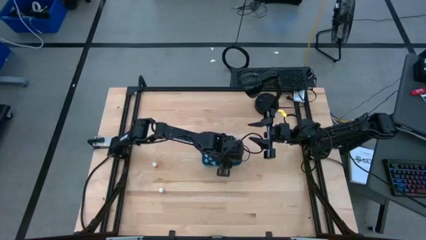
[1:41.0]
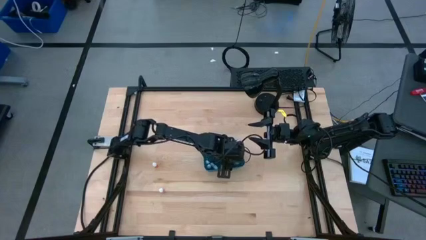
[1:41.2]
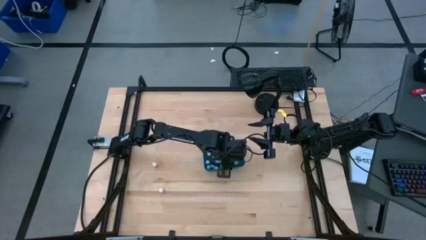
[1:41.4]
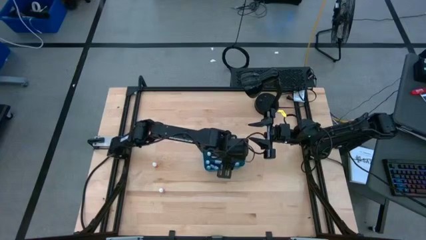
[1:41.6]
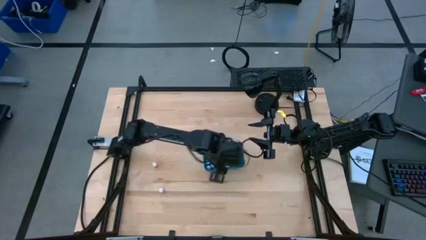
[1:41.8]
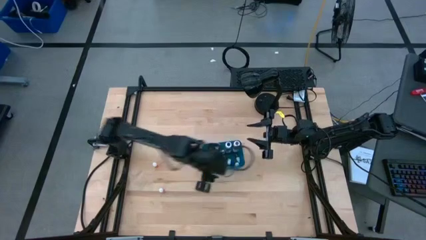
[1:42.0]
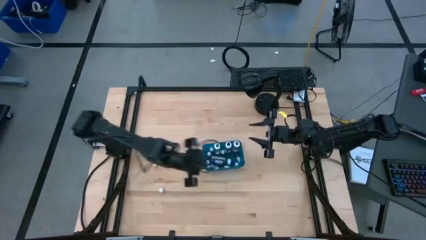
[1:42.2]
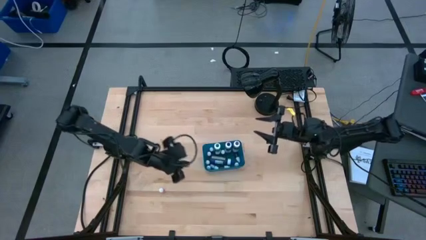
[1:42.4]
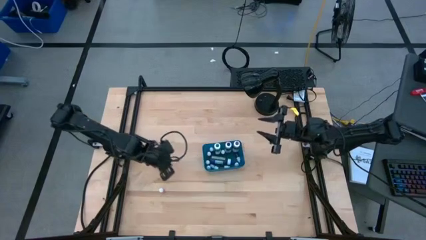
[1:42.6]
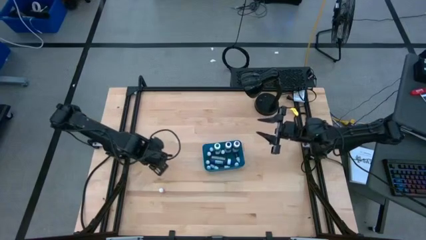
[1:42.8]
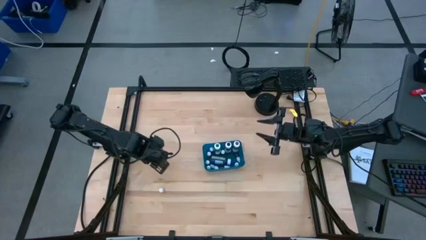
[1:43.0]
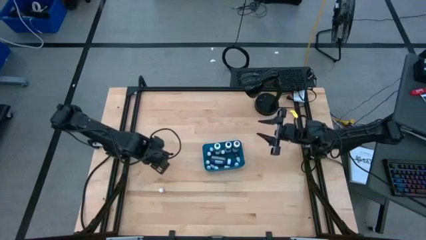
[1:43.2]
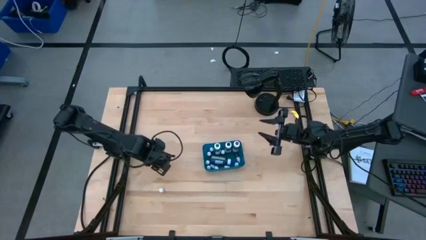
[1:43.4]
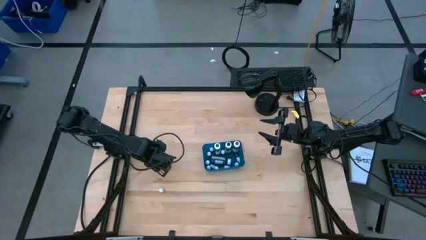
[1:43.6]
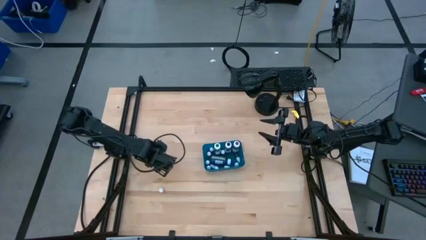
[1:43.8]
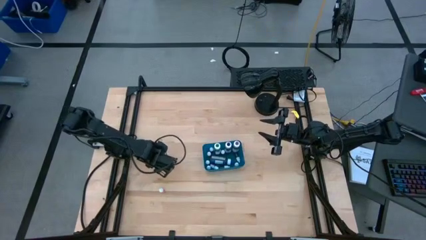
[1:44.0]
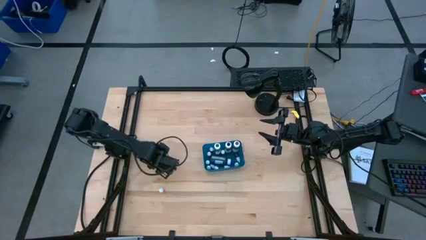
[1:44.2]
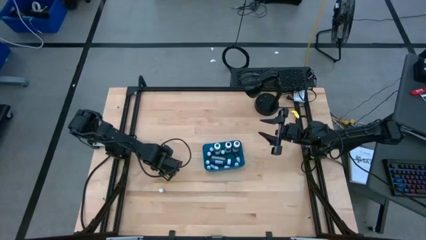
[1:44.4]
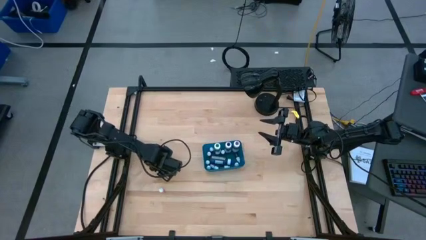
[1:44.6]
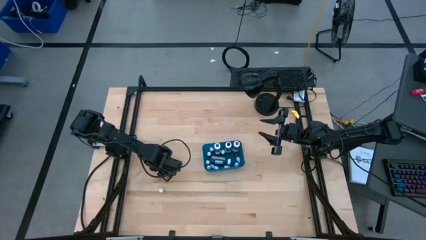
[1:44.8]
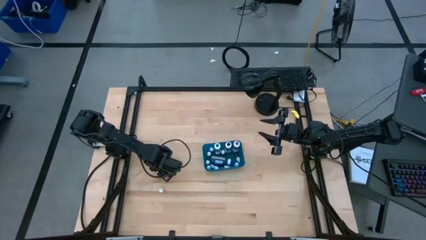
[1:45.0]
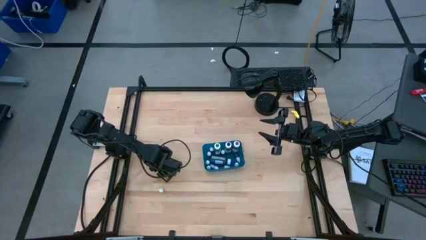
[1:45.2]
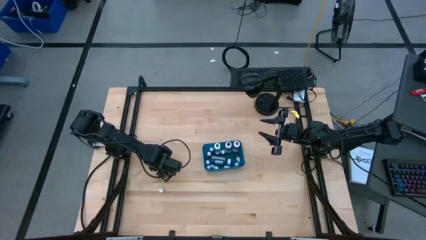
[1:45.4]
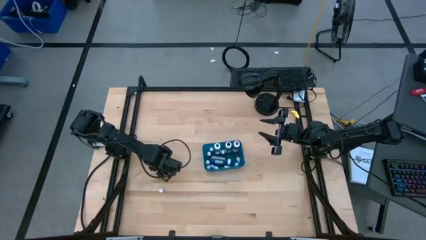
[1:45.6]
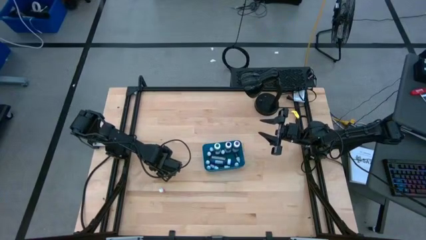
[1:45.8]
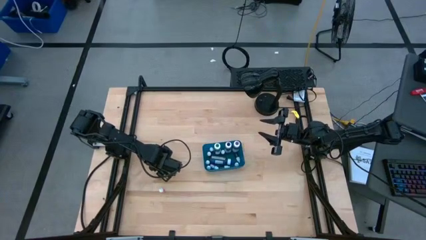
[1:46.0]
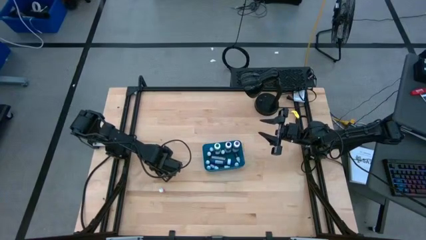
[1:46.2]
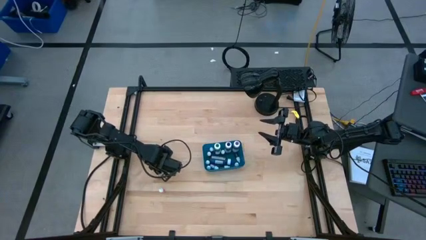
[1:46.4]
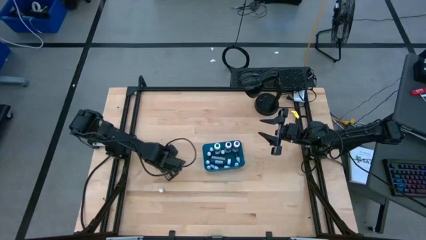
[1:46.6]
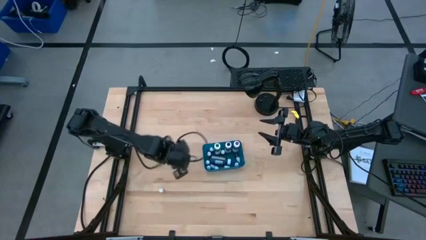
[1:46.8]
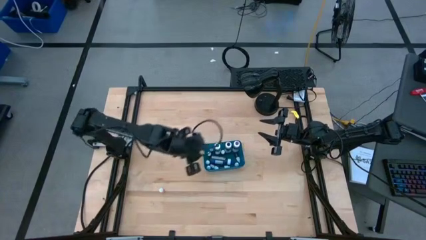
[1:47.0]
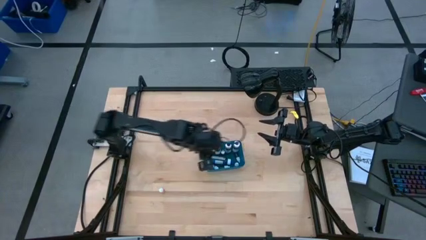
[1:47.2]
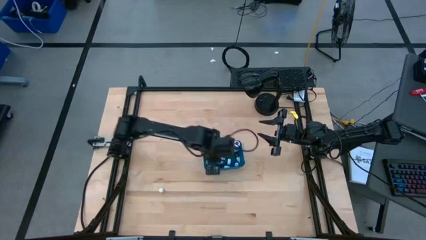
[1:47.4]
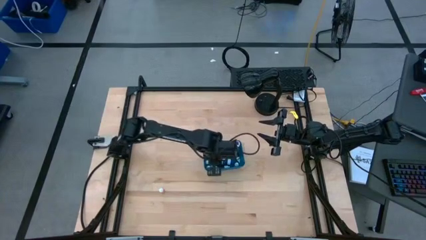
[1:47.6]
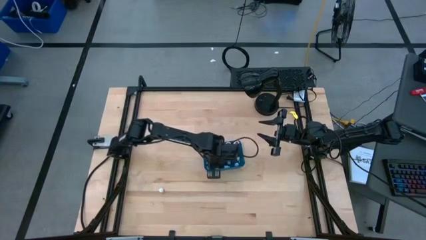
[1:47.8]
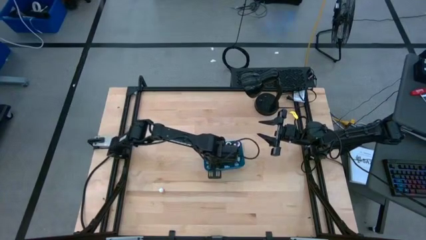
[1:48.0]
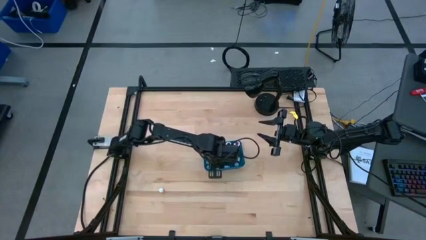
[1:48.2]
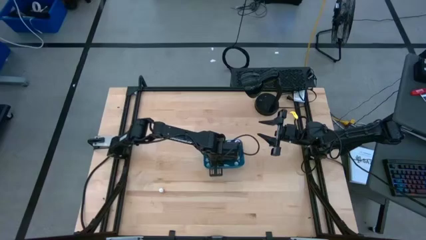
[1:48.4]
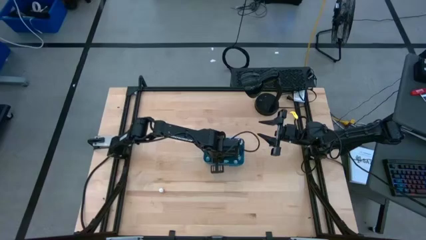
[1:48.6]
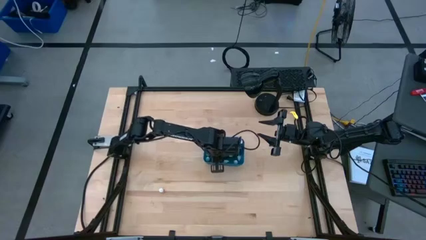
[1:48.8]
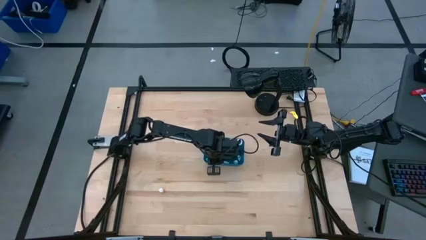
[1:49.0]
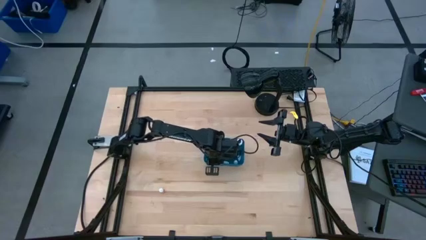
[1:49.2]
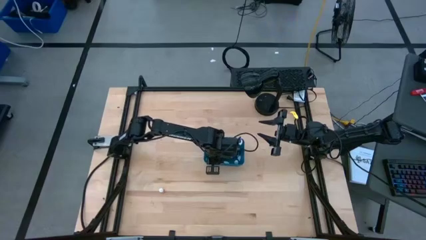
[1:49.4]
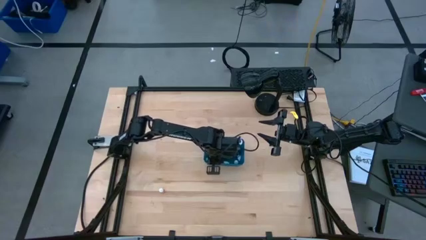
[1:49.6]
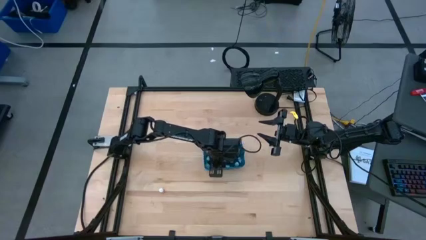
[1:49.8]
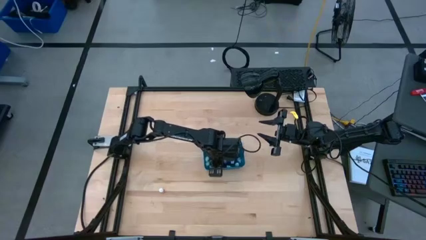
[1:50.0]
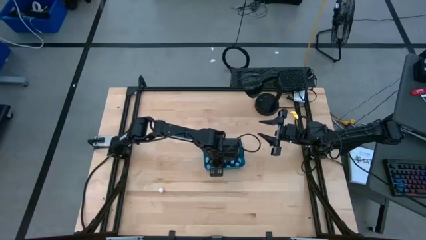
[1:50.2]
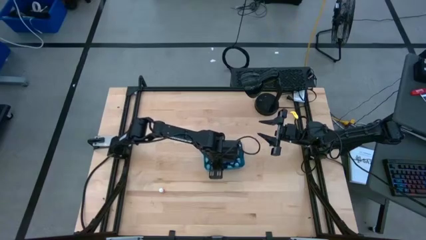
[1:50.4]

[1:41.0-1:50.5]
Task: Pick & Place food coloring
Put the small yellow food coloring bottle into the blue container

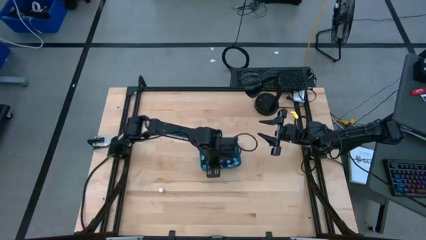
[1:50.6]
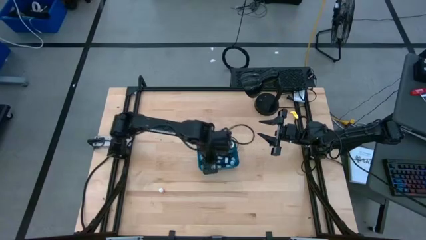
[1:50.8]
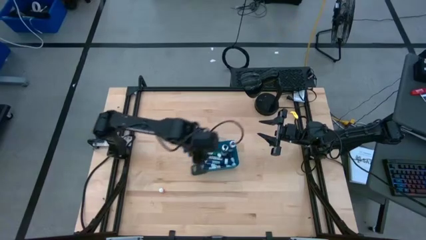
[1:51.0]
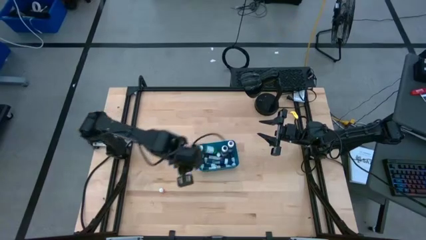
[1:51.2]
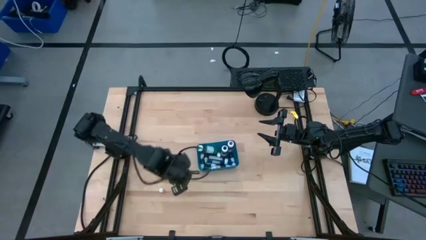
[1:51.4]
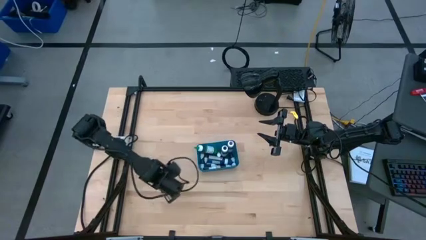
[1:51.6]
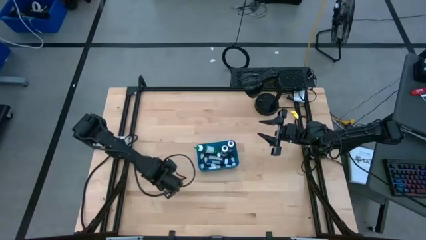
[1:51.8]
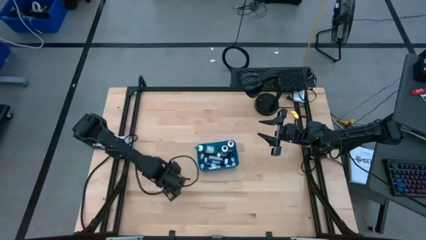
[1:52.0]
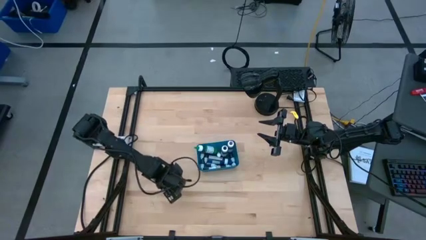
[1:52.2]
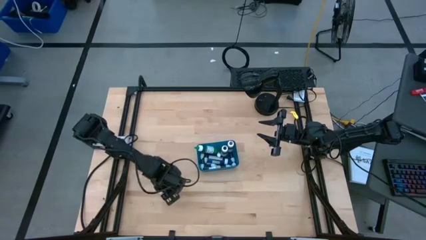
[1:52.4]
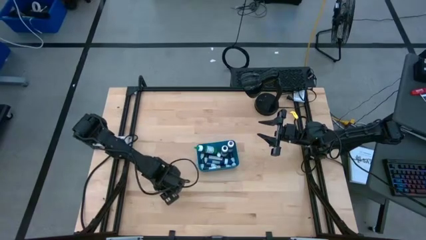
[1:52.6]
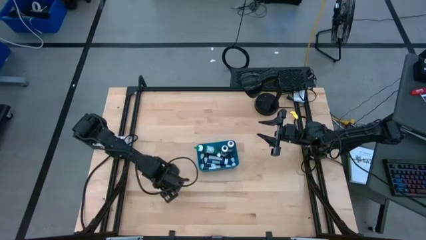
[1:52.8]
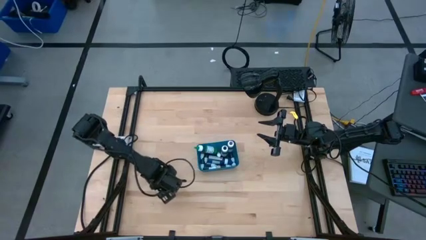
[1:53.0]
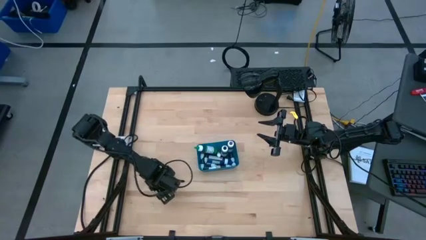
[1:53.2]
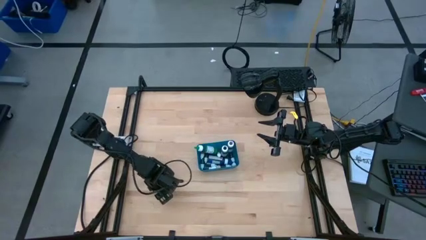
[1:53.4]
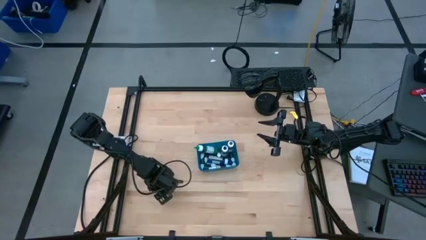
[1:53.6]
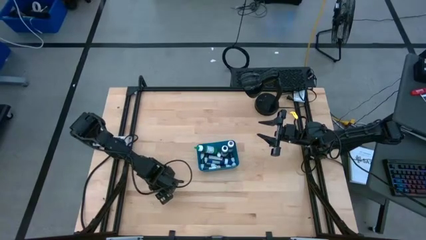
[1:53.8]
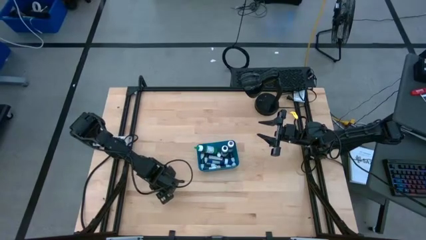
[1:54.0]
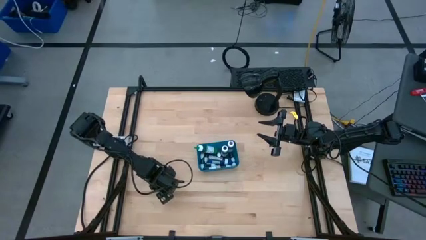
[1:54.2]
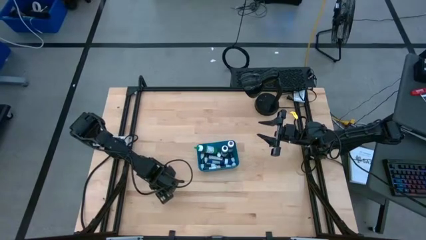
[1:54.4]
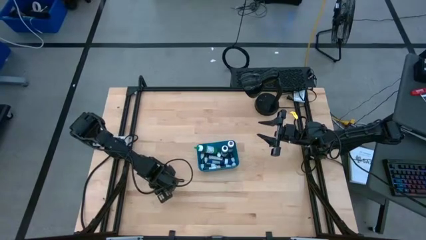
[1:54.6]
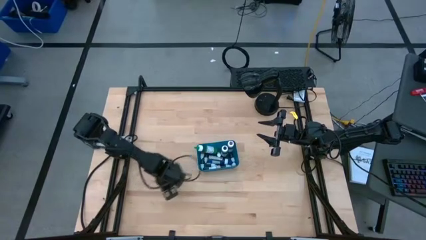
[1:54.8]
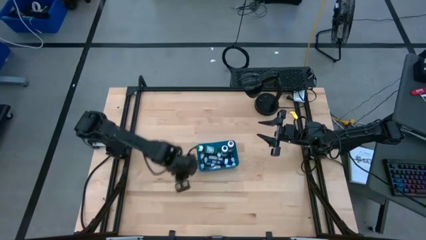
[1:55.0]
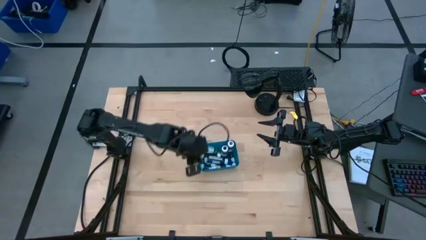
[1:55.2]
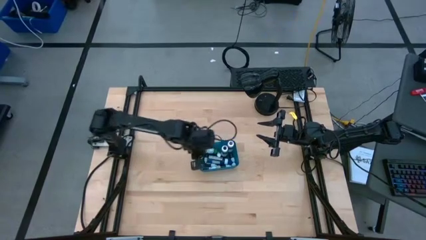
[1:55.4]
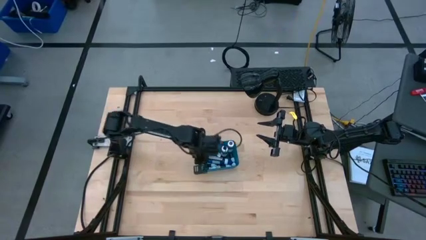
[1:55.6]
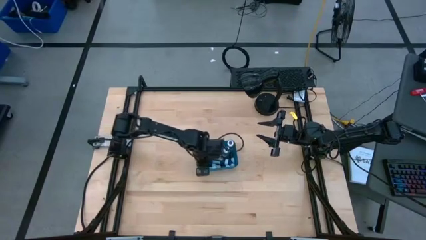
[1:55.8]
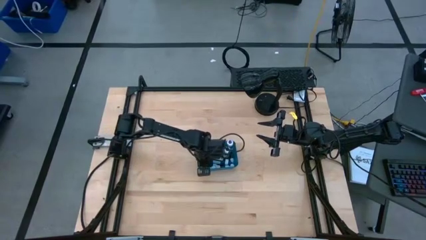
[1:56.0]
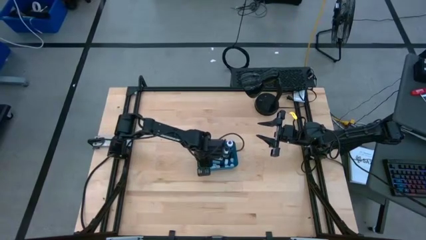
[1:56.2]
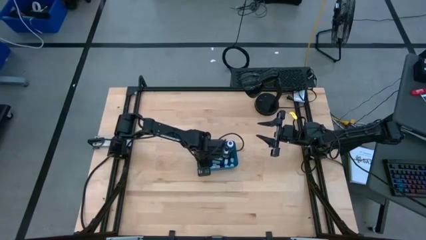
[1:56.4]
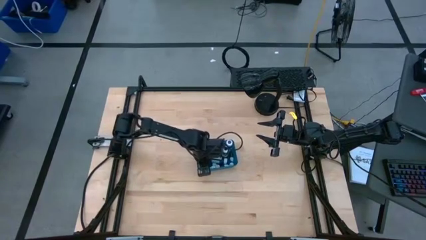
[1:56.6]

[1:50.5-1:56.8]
Put the small yellow food coloring bottle into the blue container
